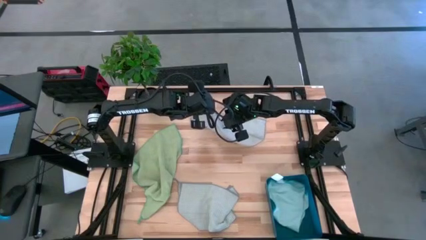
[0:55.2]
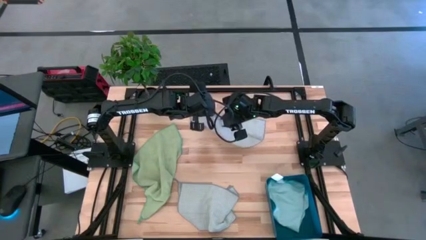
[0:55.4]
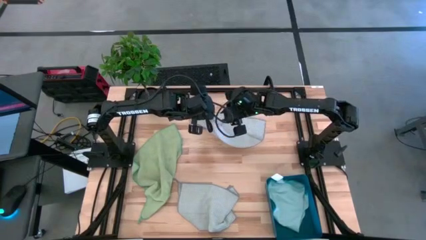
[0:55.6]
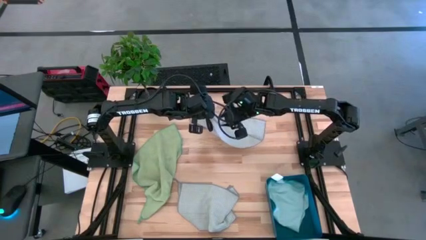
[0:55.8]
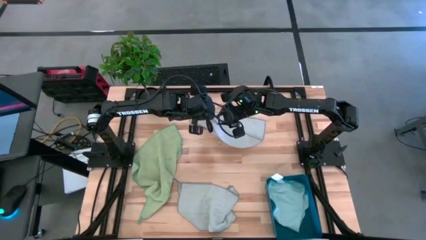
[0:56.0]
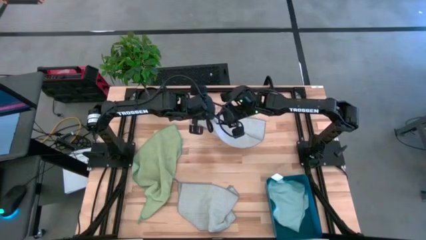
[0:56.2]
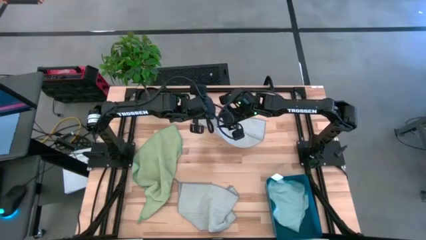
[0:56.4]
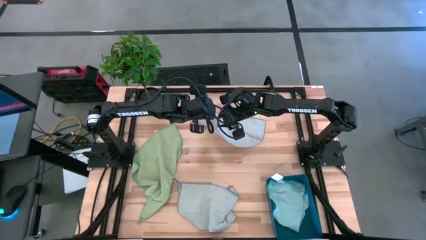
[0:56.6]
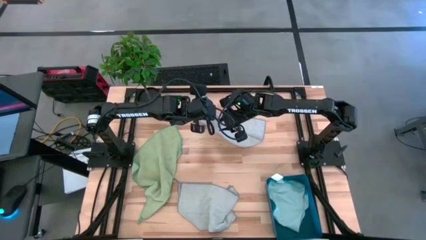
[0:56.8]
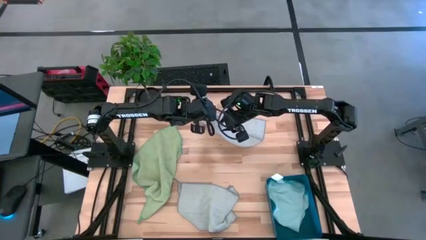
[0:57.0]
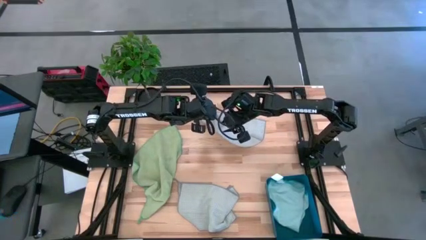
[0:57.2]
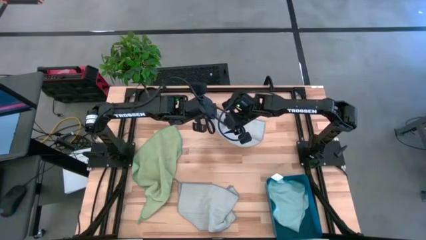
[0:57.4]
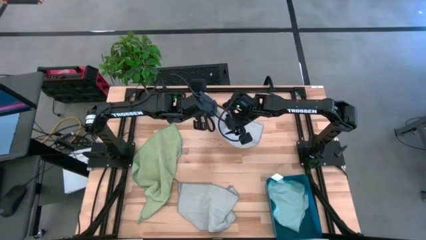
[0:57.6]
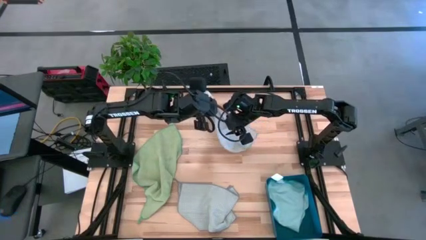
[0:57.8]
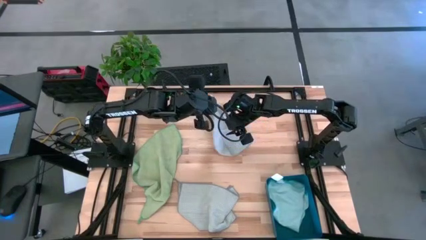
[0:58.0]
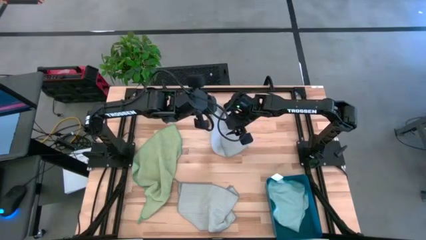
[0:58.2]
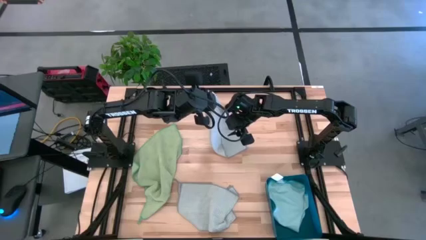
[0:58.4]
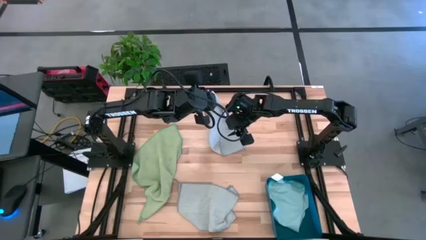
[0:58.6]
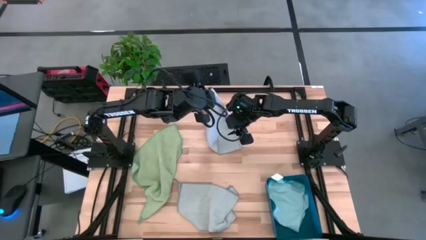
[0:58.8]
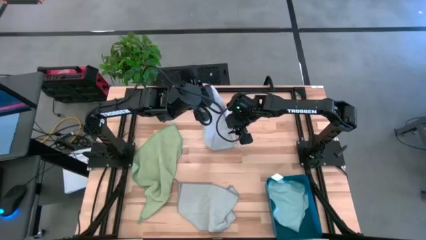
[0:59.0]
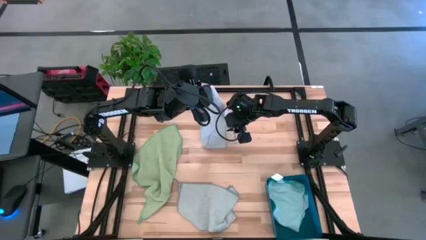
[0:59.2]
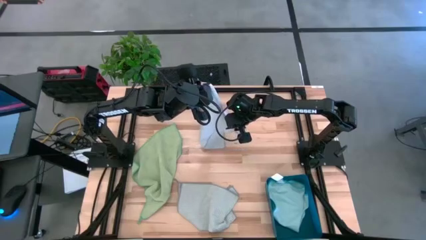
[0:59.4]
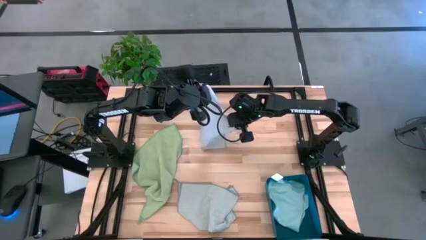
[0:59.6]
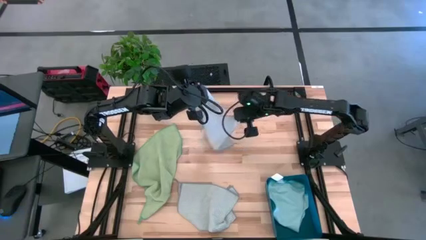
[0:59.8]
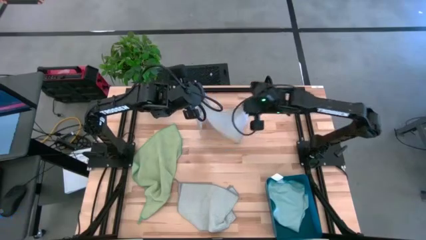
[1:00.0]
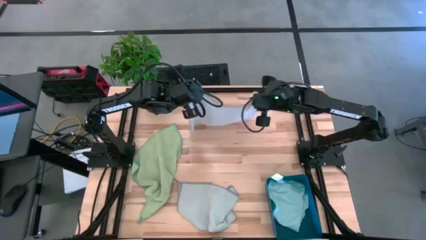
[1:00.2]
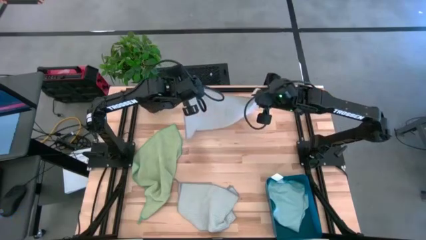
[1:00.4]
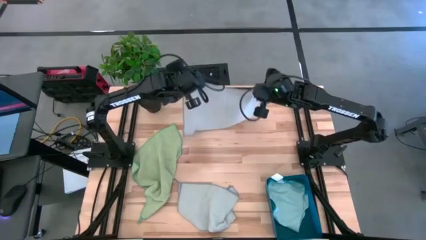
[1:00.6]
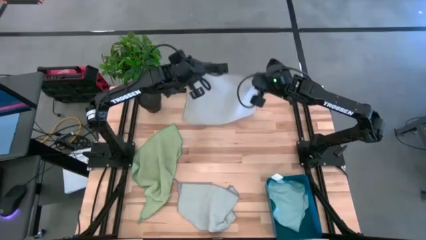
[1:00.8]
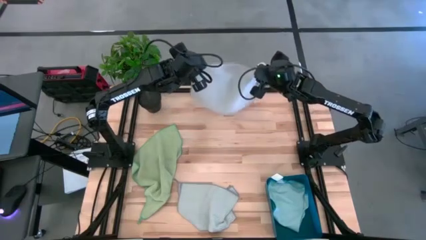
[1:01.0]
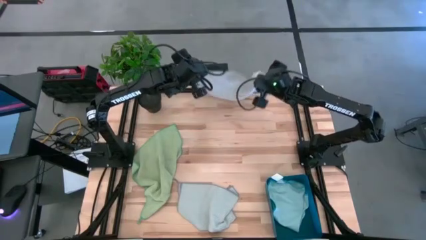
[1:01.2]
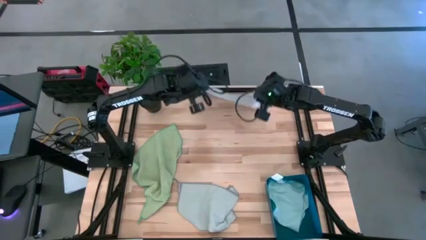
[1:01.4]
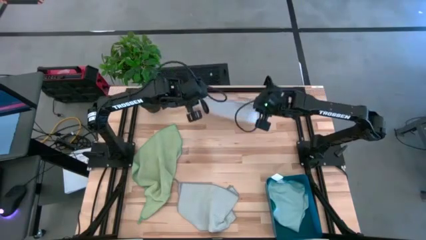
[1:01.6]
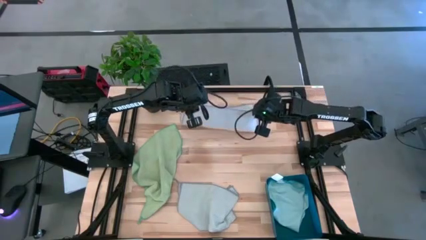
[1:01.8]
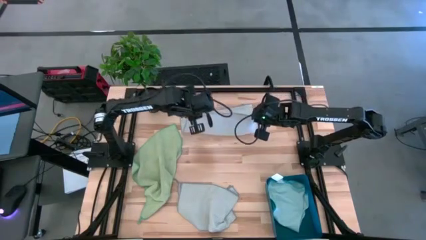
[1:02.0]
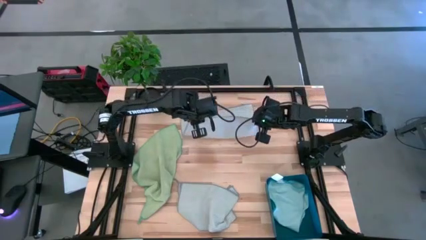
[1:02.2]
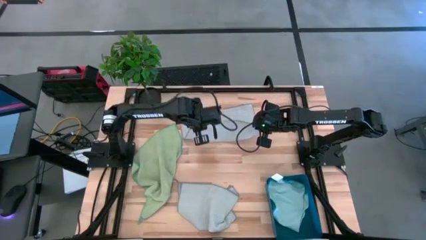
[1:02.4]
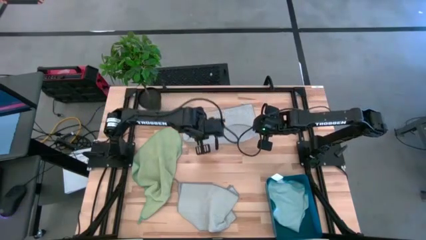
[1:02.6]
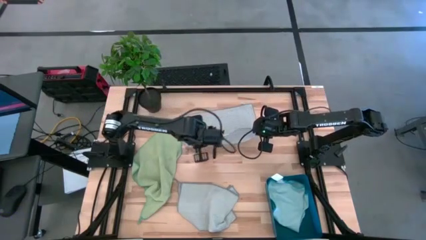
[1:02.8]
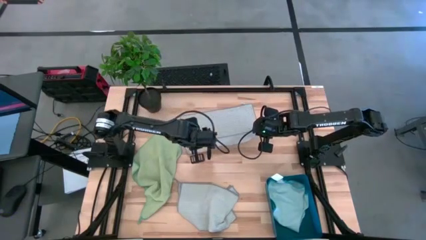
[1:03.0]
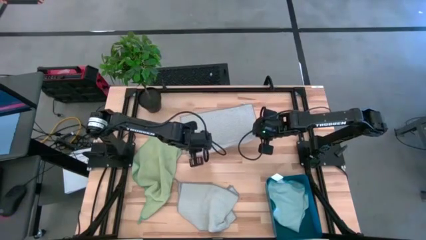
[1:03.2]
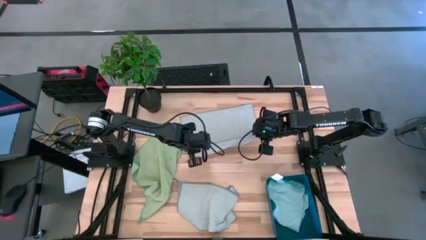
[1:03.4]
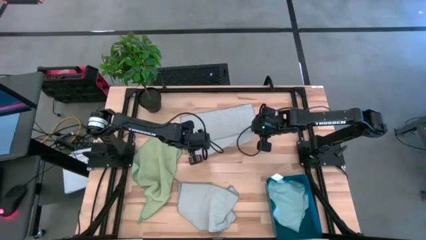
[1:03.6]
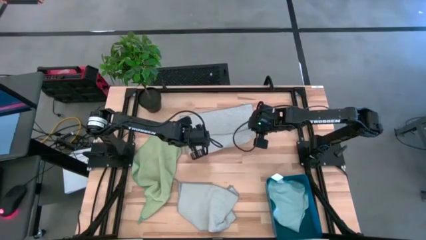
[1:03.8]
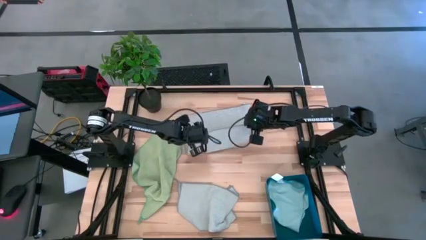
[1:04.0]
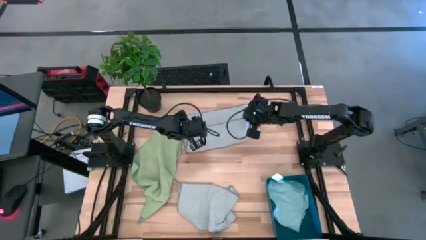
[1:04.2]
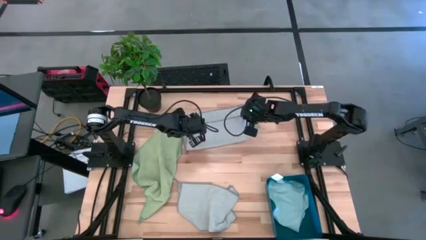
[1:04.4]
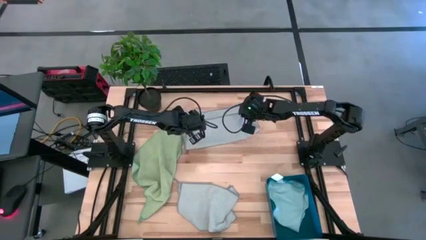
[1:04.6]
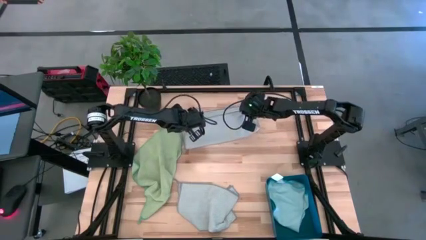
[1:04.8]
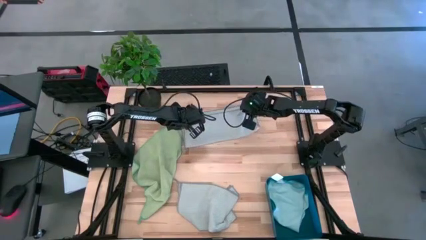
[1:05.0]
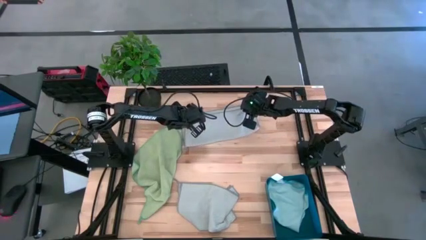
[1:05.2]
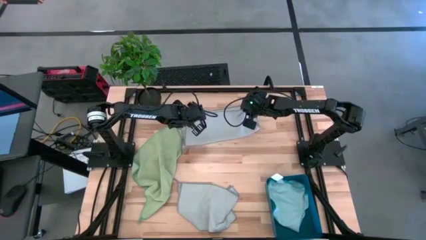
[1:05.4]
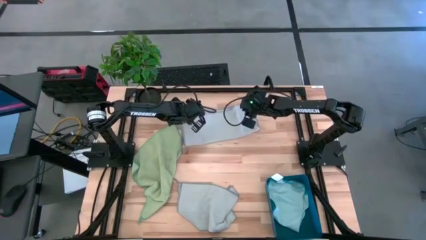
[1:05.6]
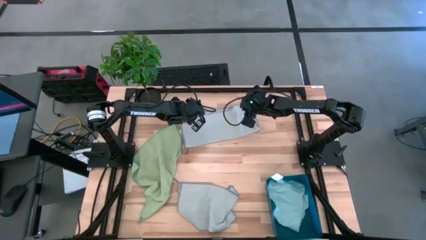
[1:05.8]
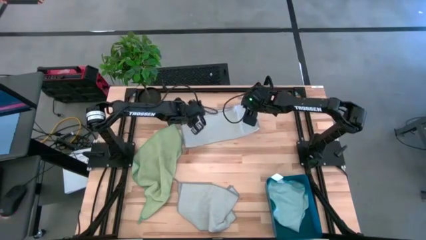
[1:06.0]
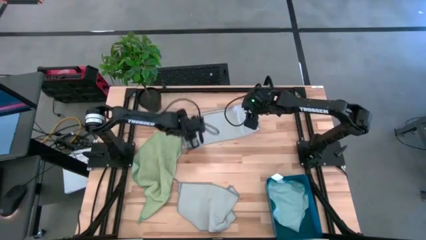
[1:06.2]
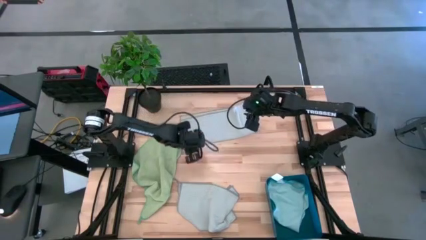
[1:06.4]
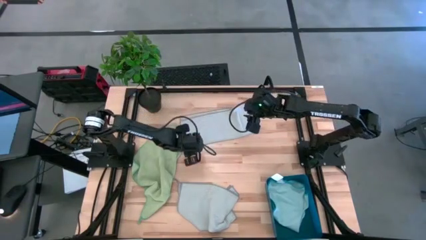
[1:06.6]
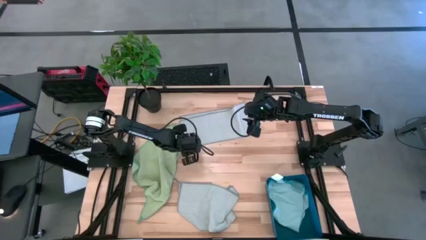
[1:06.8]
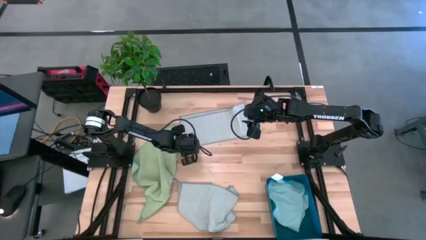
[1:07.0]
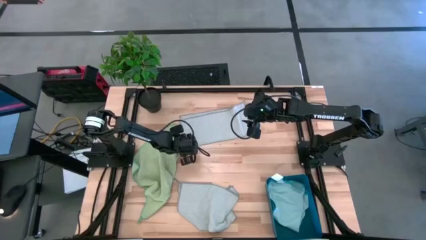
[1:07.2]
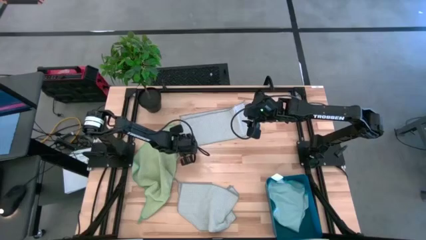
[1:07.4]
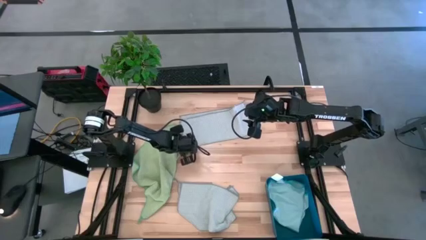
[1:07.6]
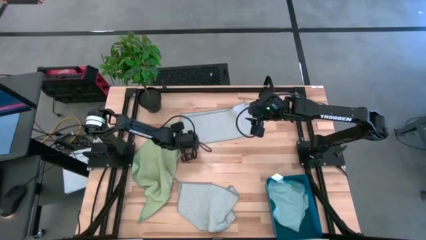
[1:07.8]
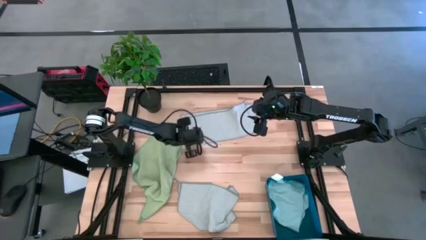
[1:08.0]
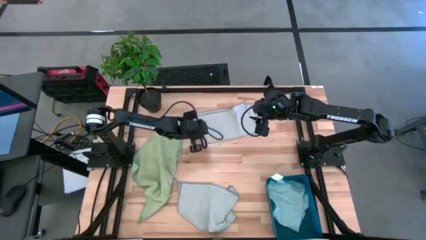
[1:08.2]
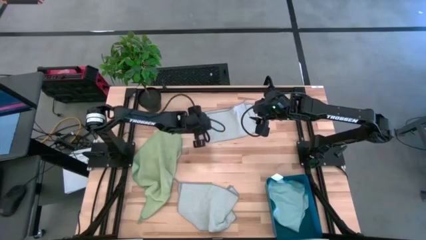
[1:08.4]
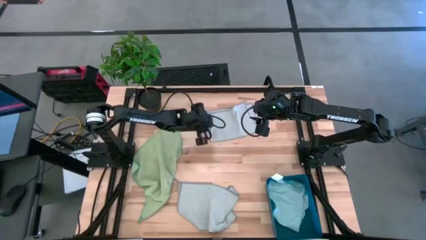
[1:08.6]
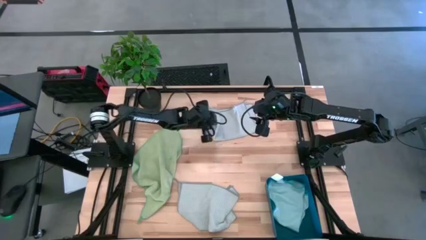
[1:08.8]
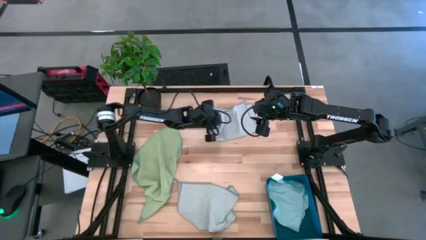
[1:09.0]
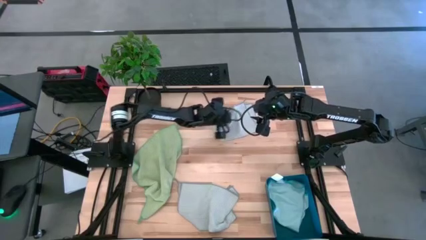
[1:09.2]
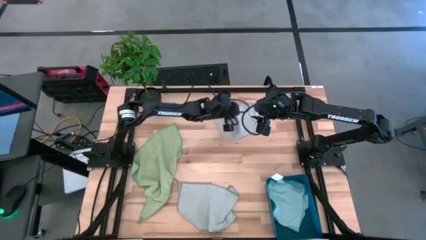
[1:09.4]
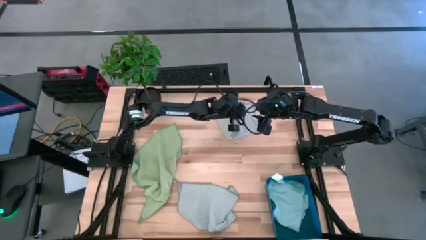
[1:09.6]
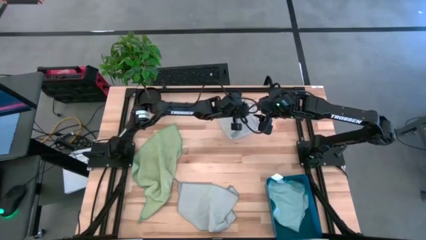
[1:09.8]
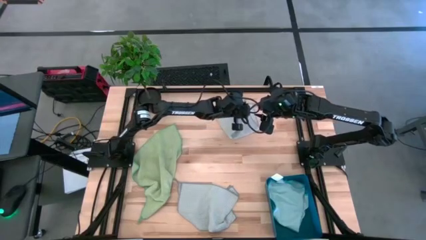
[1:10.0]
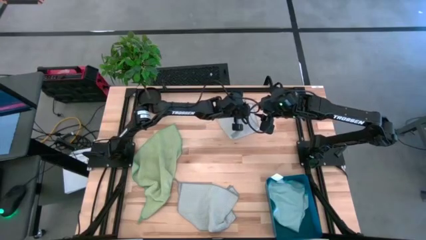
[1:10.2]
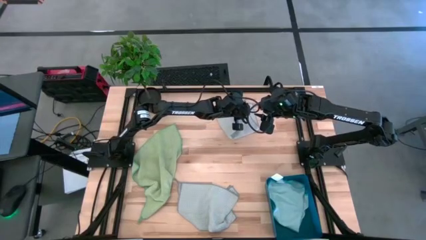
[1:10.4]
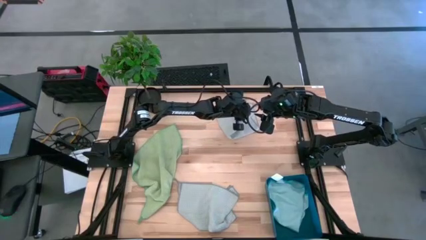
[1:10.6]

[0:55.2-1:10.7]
Task: Fold microfiber towels
Fold the top gray microfiber towel
